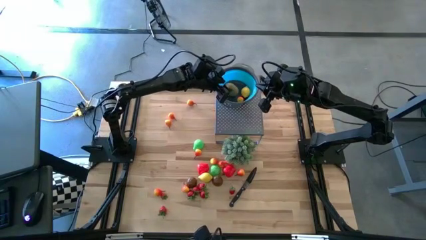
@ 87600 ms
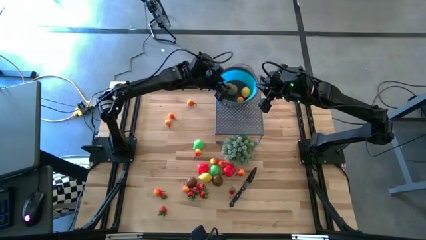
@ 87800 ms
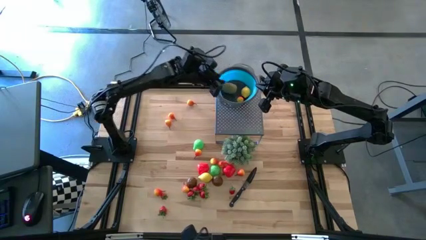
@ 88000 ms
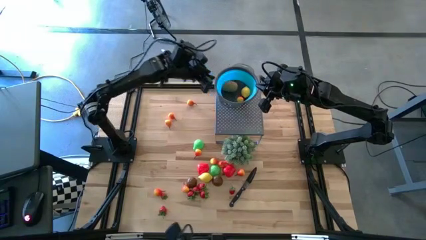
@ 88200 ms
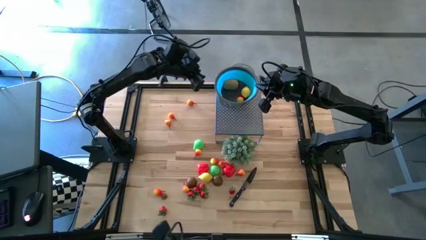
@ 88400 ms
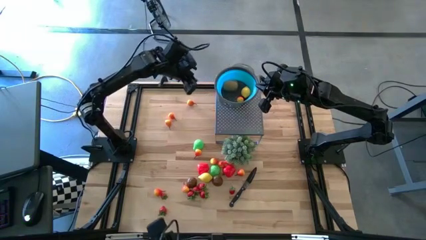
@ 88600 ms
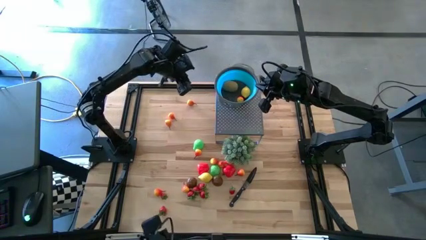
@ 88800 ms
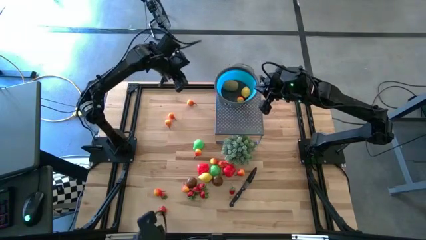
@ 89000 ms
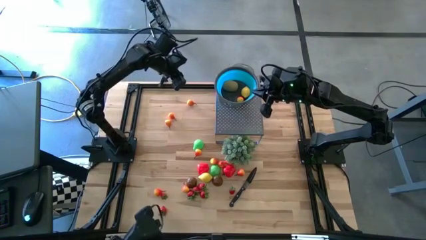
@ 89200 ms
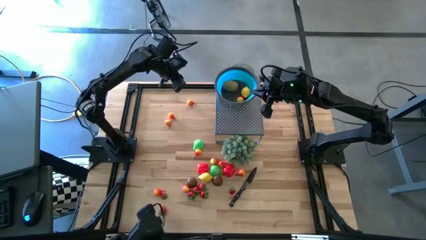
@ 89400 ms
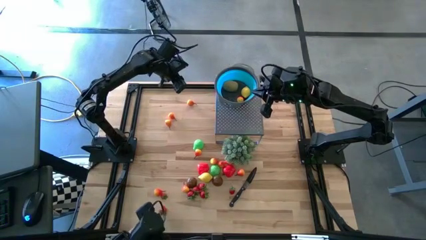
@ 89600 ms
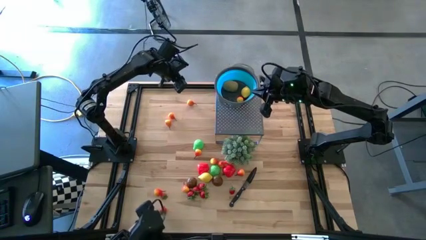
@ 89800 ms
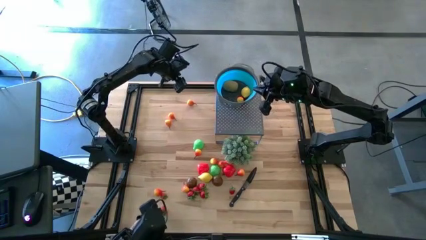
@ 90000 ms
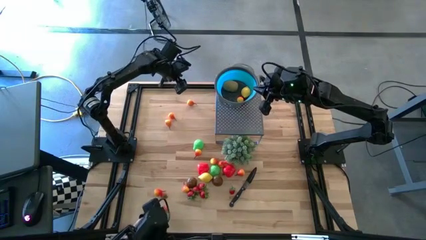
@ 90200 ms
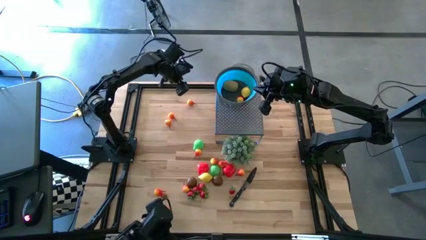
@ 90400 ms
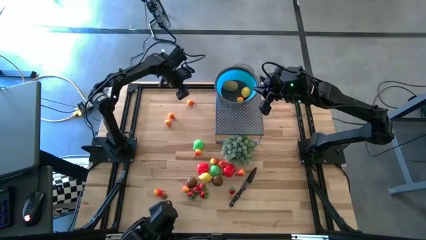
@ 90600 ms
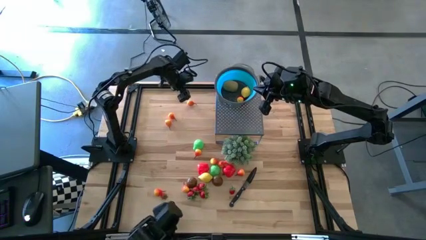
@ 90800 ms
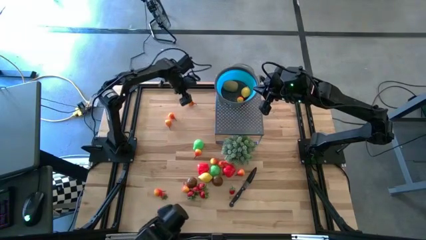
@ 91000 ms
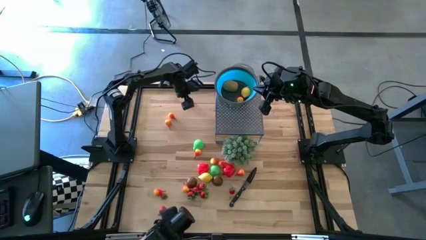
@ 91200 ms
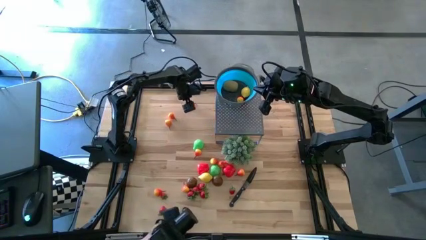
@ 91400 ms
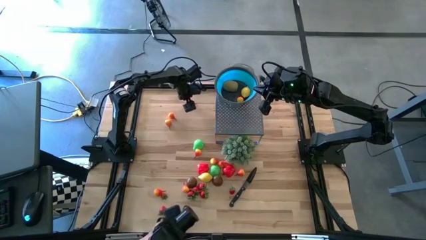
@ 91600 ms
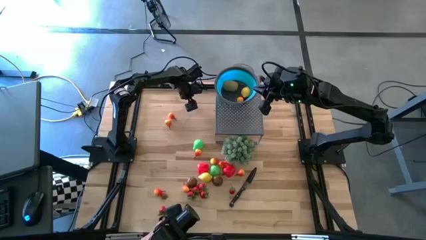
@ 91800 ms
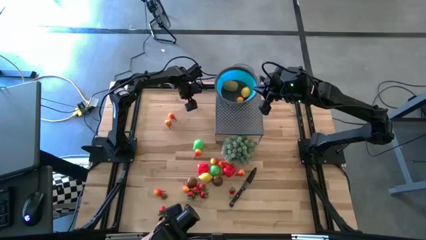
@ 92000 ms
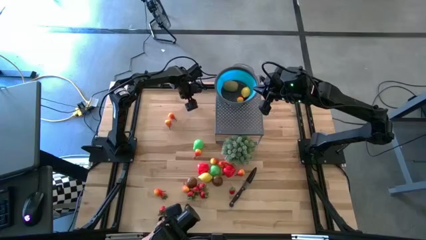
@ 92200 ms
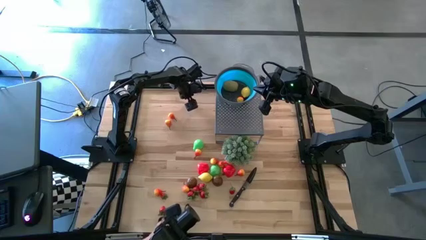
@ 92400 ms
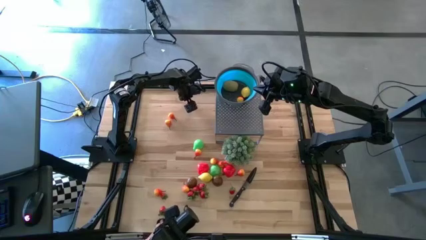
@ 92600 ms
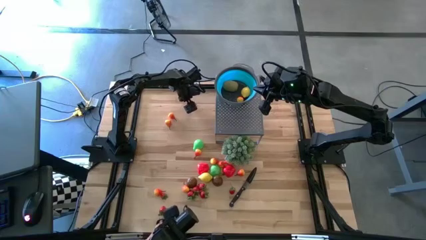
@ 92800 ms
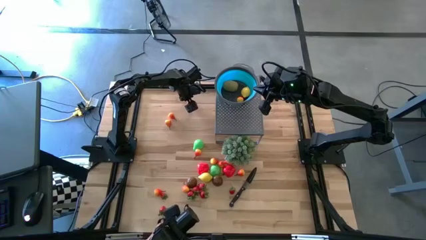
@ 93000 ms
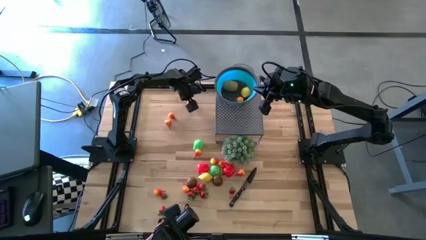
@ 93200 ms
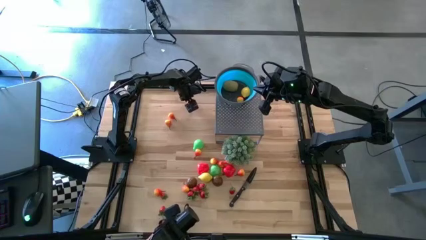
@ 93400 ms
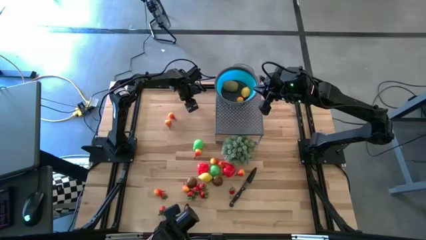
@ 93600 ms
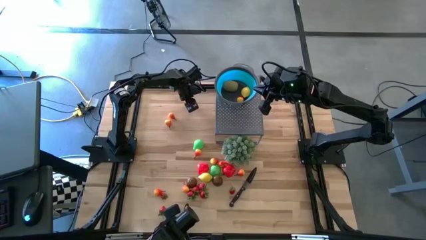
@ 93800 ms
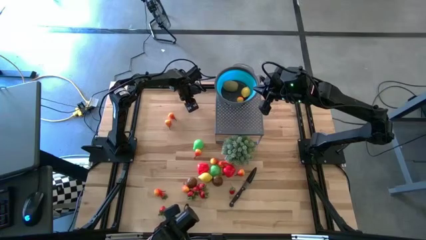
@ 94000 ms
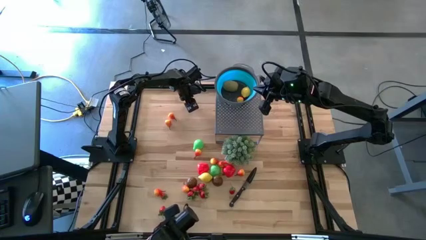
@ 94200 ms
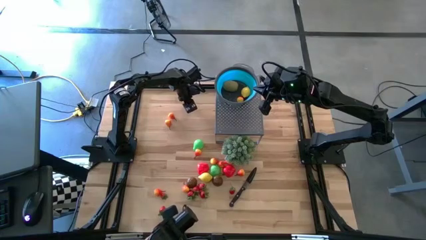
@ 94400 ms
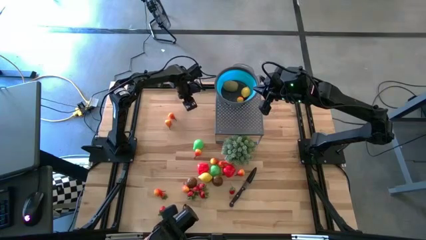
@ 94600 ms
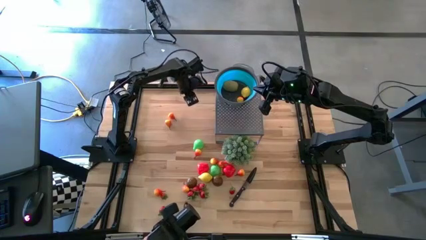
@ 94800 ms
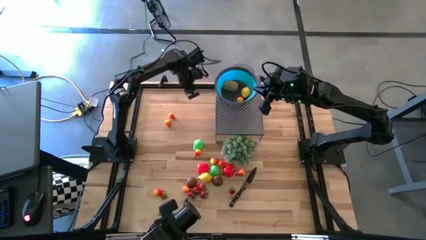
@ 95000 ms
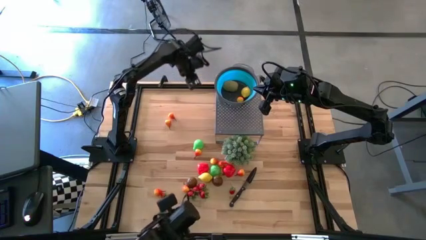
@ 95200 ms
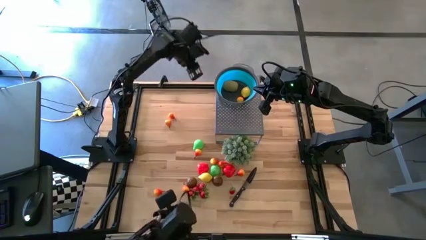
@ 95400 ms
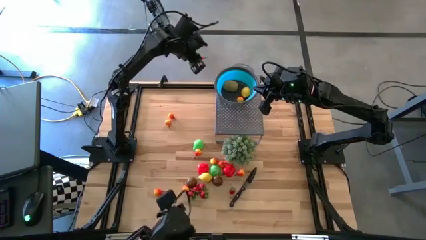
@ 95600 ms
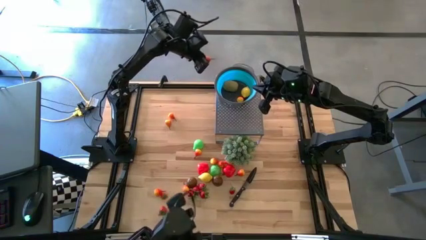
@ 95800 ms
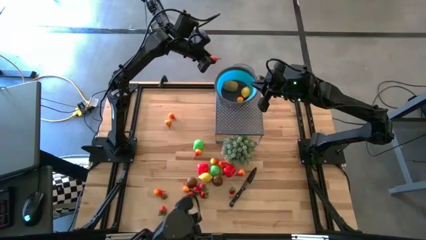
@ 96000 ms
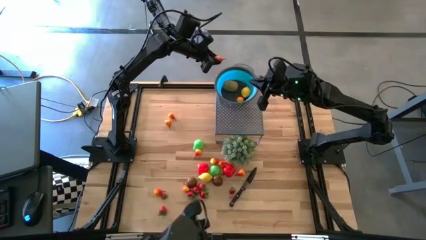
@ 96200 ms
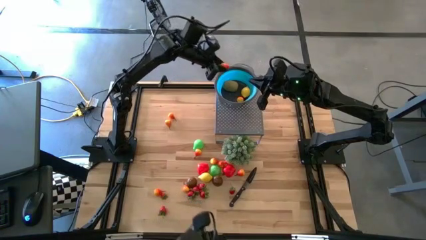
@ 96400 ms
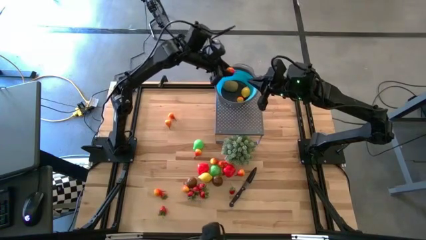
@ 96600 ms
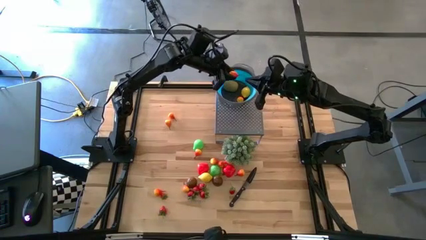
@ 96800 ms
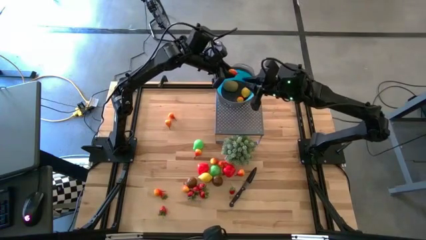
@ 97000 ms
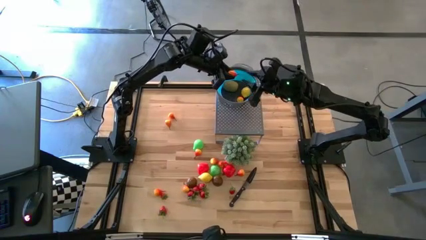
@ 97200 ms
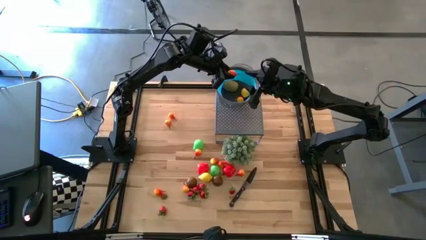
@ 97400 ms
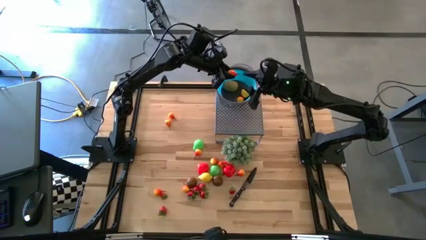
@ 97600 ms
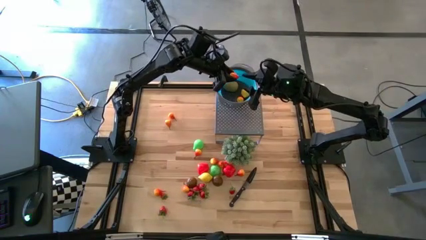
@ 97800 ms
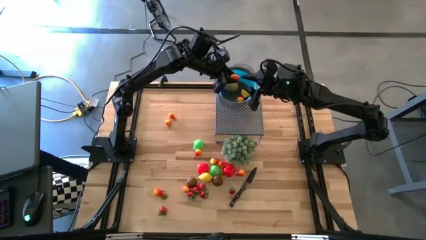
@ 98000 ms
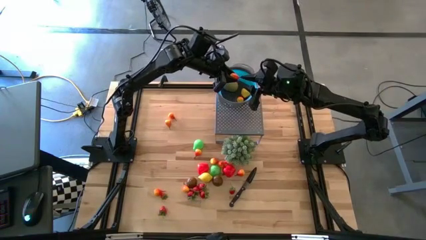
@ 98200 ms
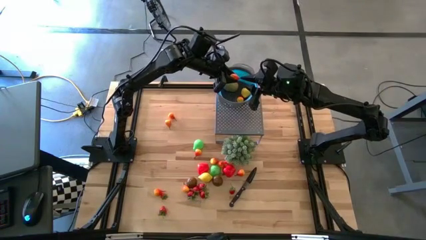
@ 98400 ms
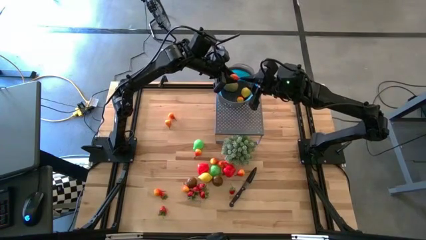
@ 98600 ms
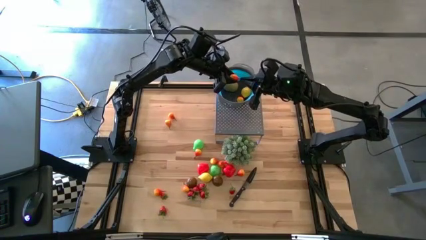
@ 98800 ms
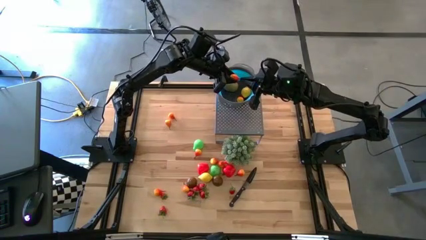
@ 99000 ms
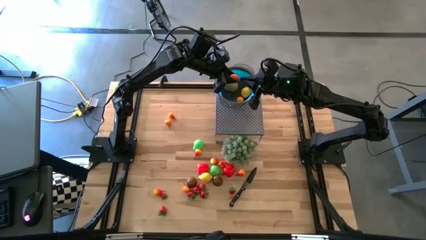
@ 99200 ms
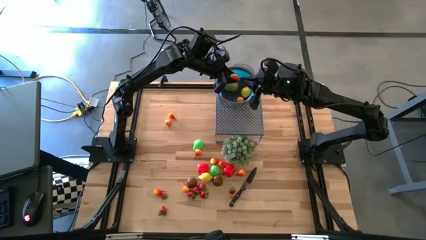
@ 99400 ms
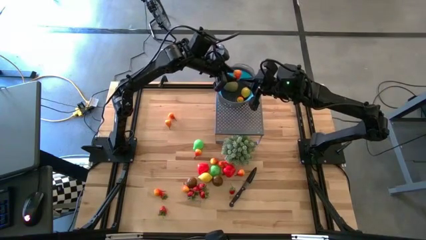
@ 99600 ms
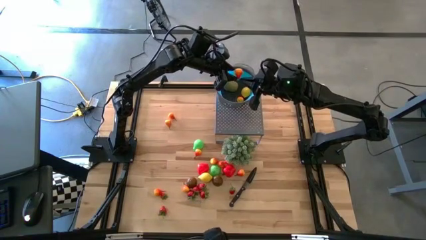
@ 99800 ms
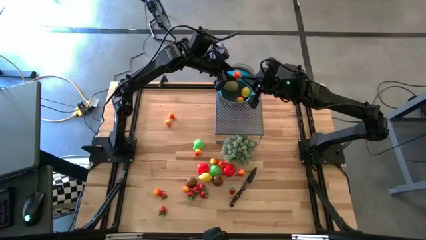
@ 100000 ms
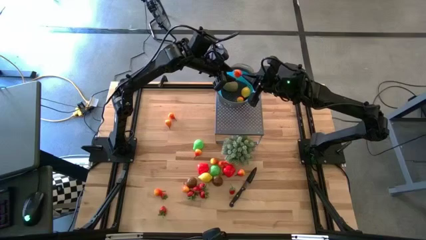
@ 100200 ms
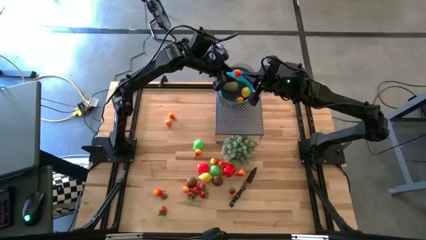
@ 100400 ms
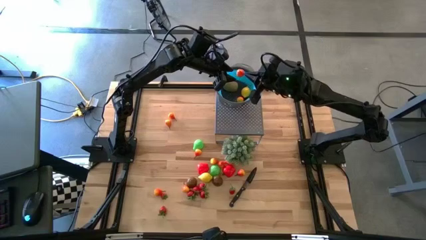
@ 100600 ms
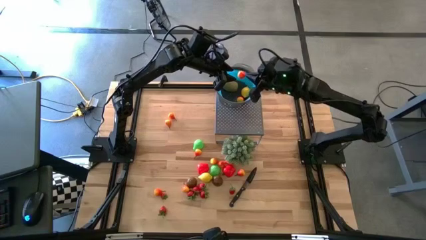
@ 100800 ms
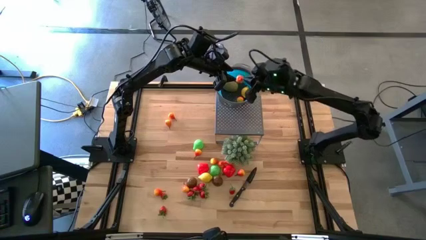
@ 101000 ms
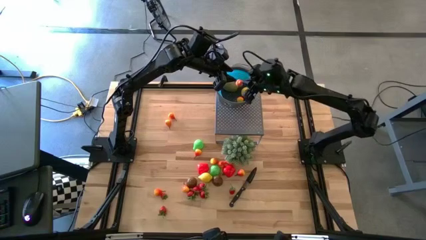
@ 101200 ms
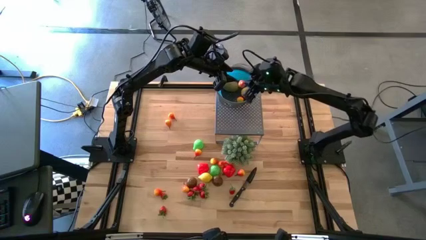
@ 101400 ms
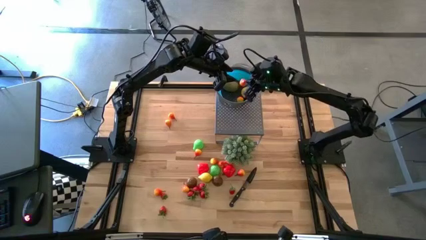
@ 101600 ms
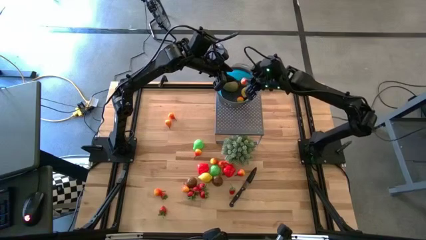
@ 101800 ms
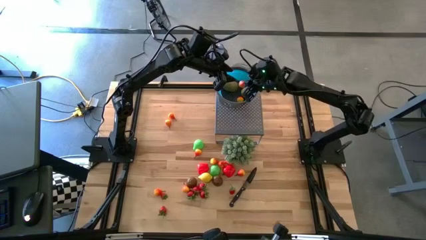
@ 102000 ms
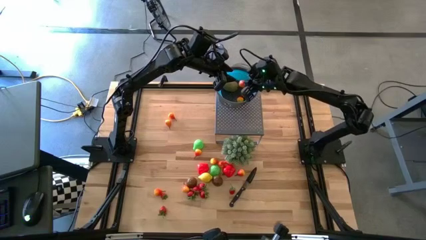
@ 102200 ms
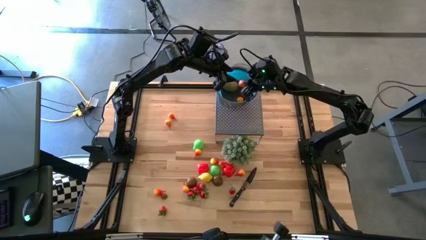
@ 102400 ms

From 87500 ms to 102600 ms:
Task: Pick & Place Fruit
Put the orange pear into the blue strainer bowl

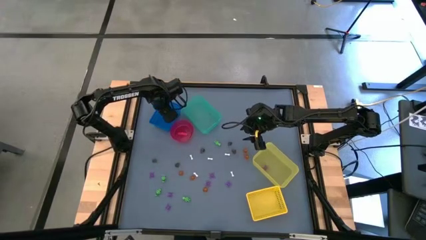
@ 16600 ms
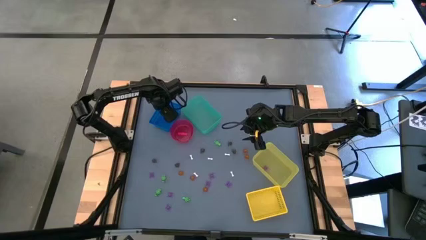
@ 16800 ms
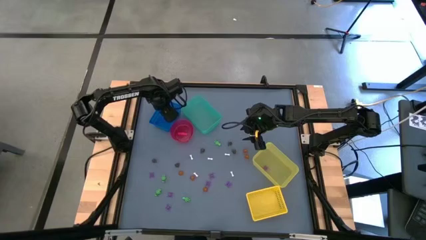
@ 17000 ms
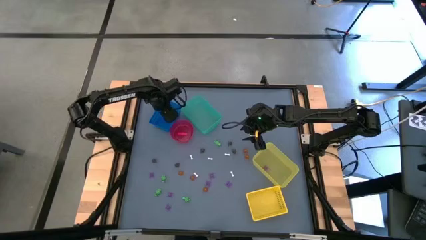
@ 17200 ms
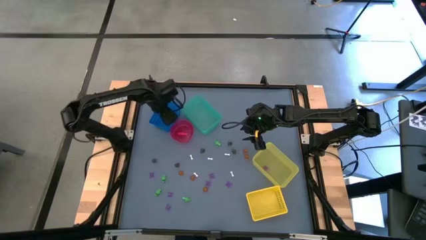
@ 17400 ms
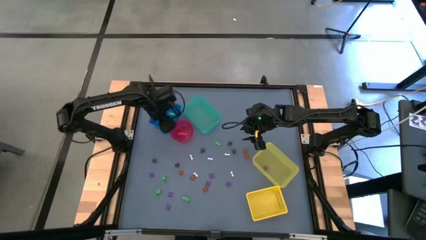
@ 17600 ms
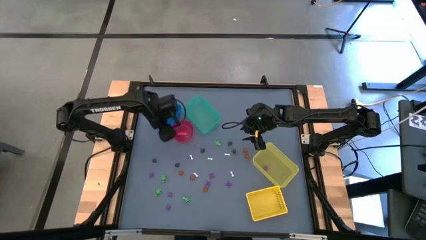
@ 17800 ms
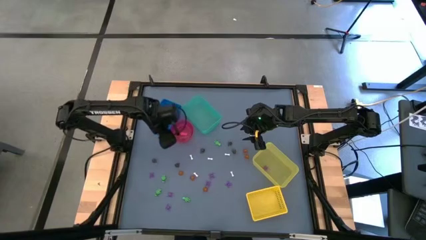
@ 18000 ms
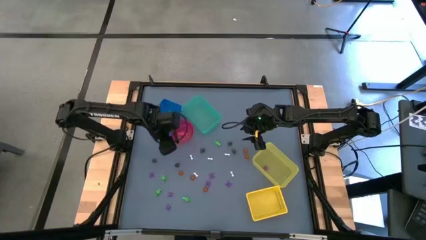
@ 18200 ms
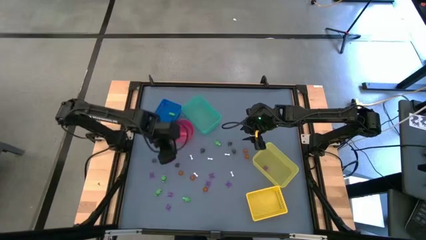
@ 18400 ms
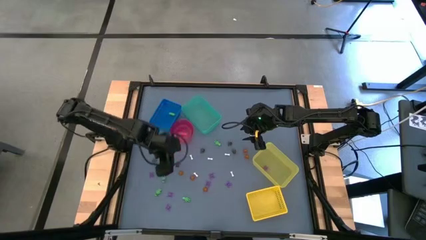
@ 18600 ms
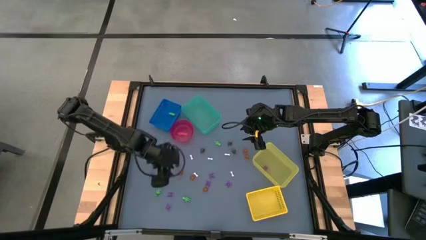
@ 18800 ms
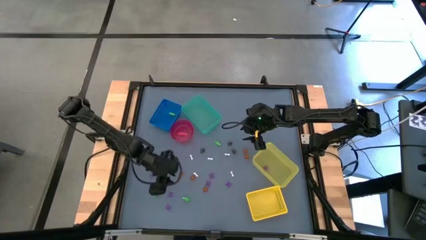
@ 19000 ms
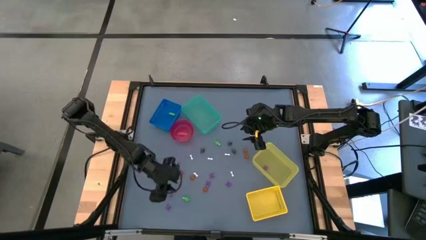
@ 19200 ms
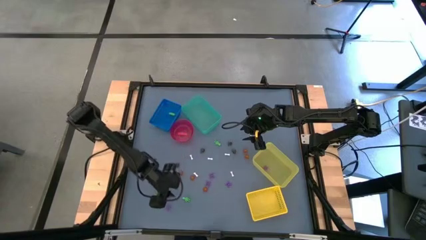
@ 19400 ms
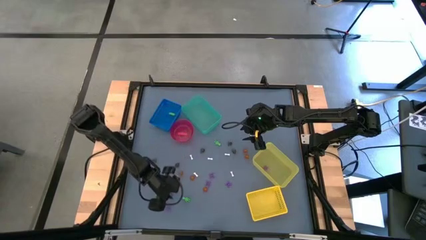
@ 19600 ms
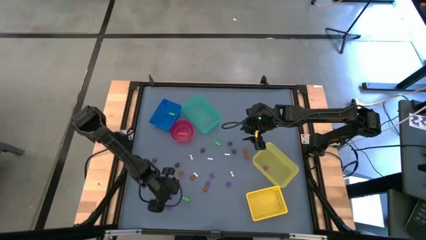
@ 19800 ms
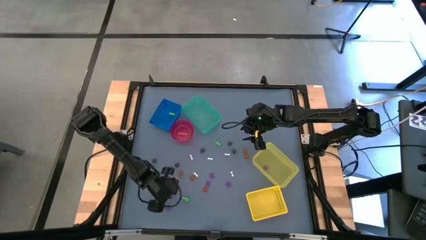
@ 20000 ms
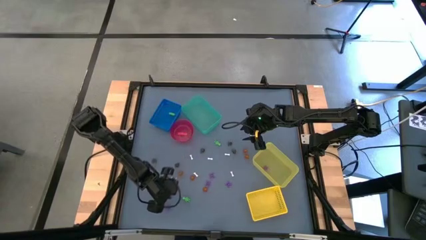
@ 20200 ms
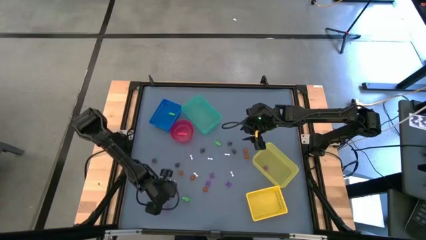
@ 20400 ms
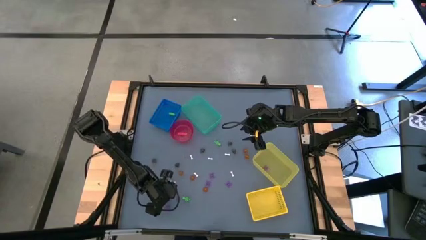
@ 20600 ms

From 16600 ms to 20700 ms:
Task: Sort Halloween decoration
Put the purple spider toy into the yellow bin
